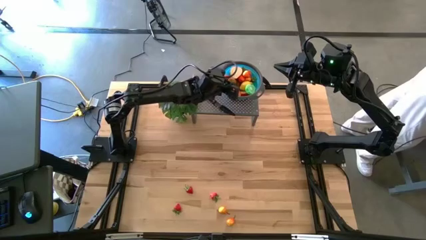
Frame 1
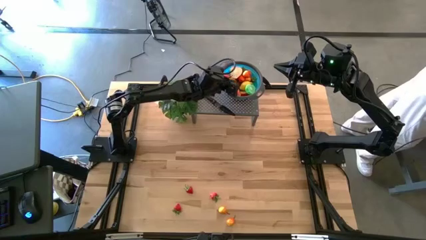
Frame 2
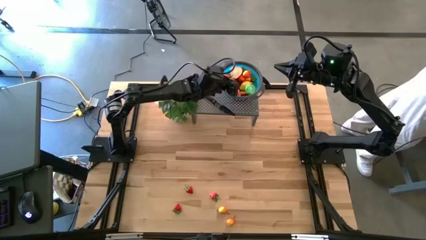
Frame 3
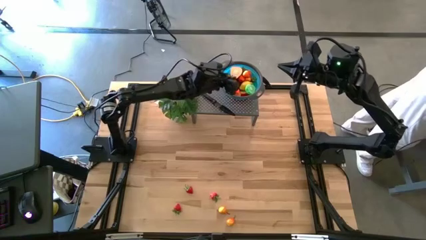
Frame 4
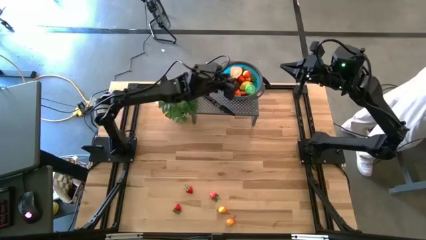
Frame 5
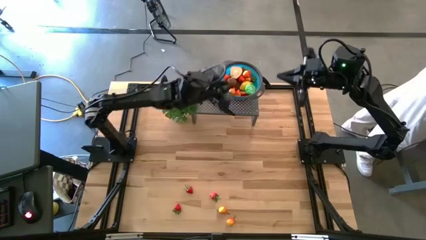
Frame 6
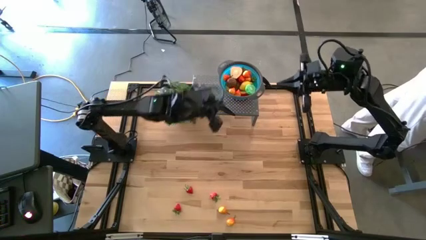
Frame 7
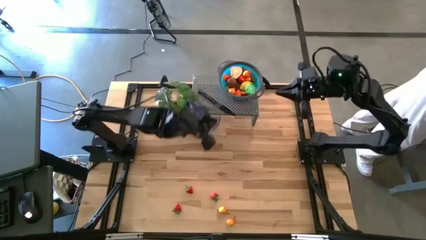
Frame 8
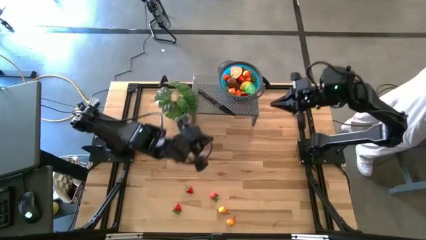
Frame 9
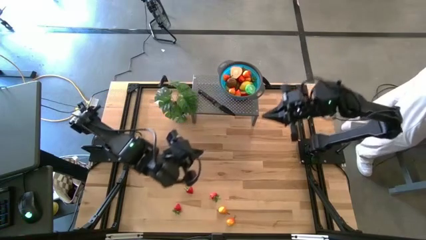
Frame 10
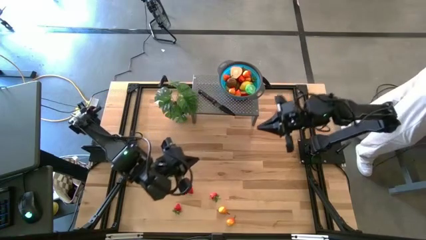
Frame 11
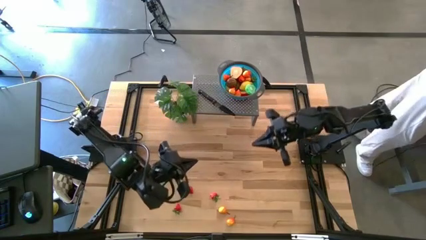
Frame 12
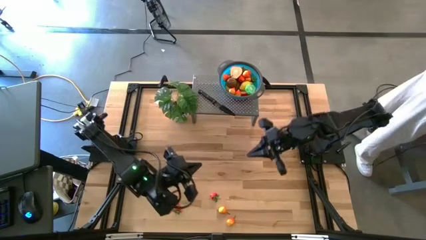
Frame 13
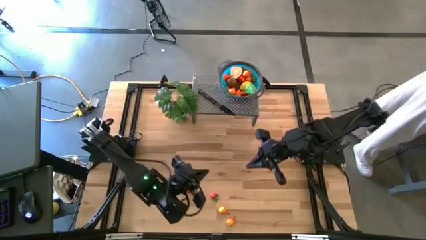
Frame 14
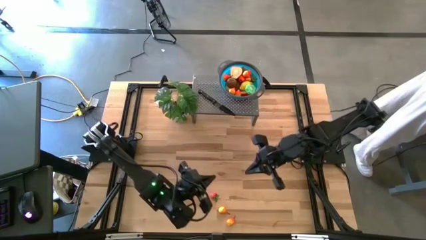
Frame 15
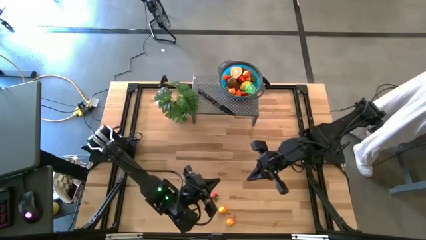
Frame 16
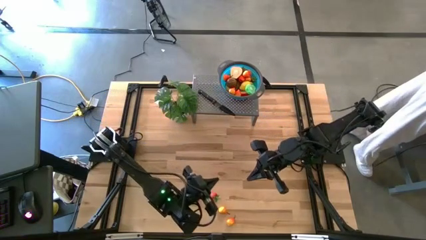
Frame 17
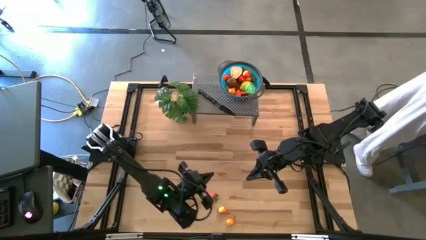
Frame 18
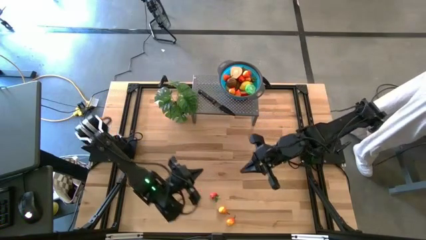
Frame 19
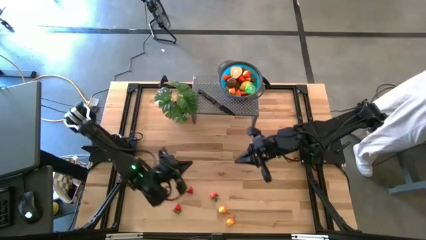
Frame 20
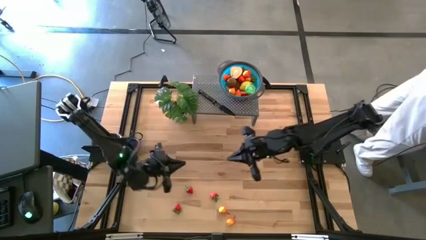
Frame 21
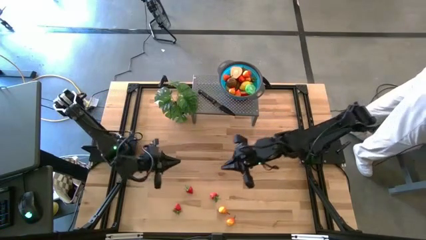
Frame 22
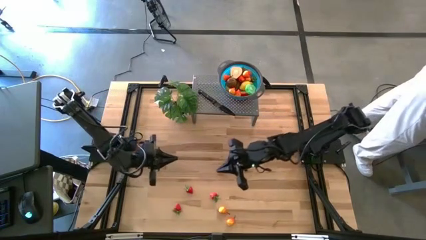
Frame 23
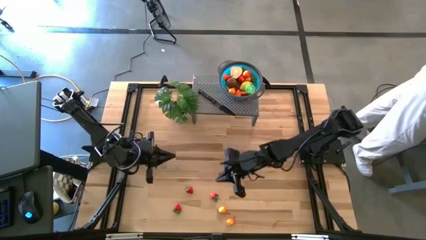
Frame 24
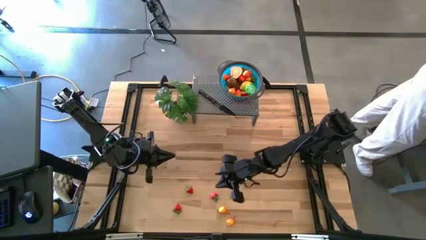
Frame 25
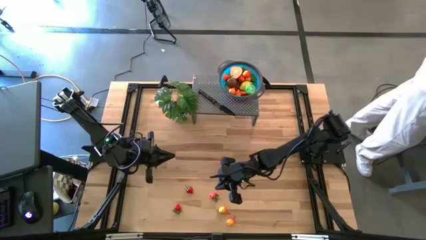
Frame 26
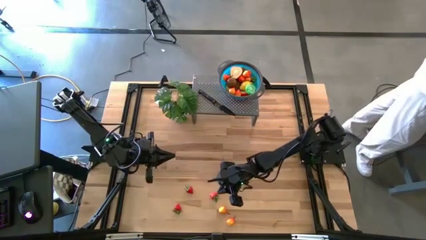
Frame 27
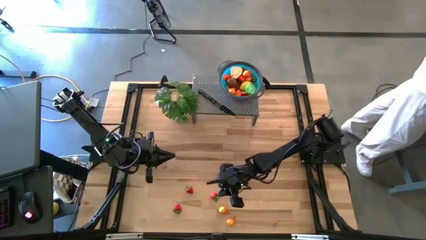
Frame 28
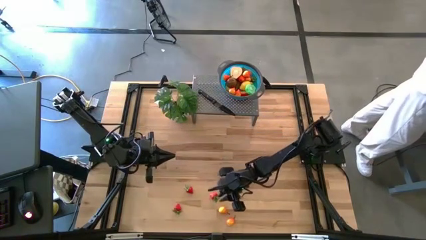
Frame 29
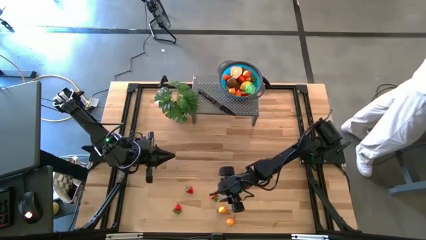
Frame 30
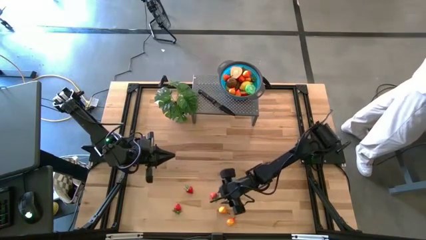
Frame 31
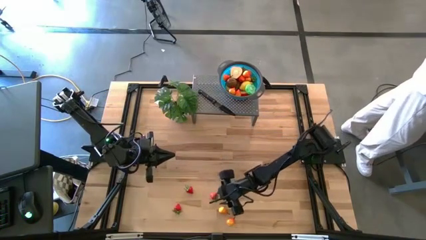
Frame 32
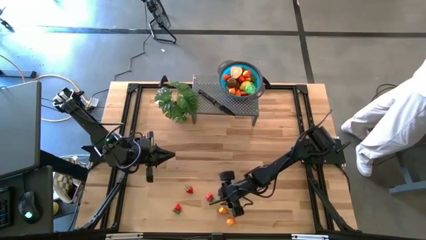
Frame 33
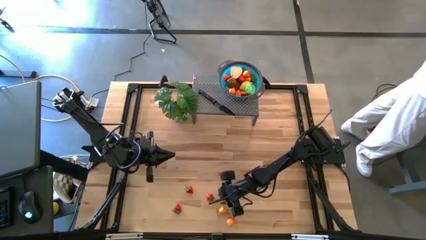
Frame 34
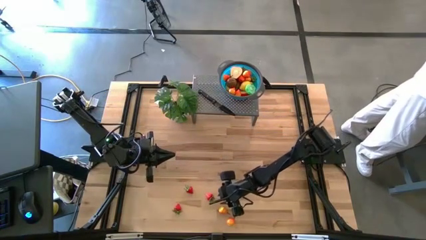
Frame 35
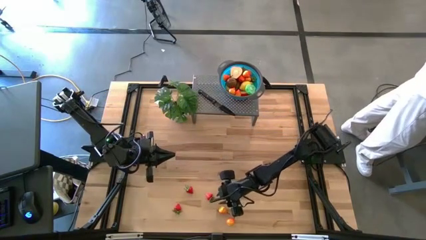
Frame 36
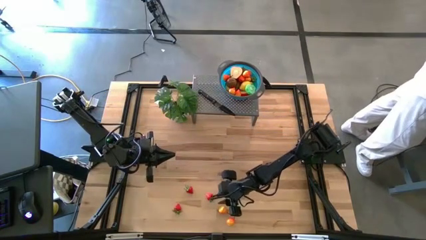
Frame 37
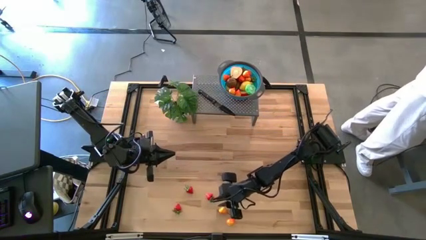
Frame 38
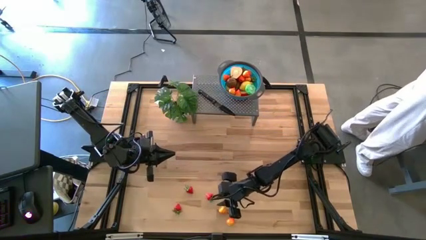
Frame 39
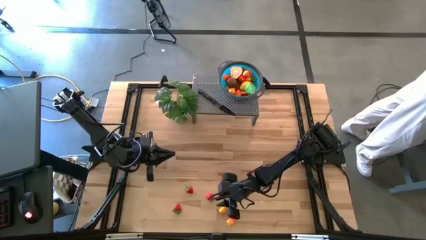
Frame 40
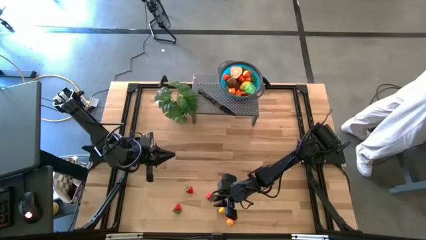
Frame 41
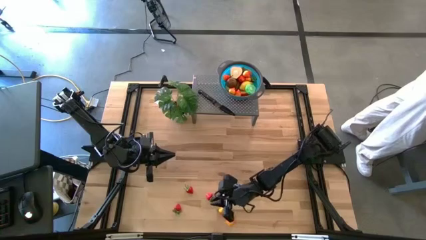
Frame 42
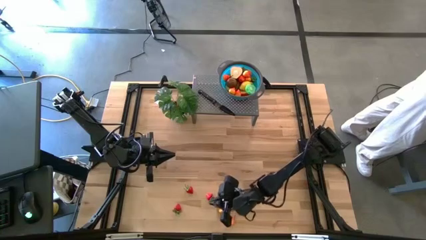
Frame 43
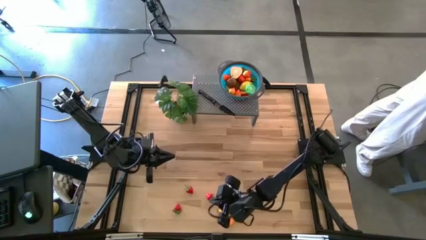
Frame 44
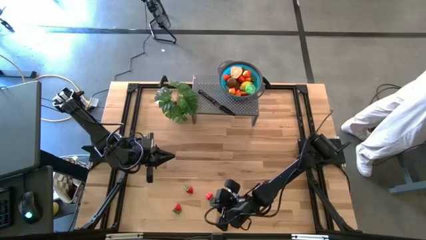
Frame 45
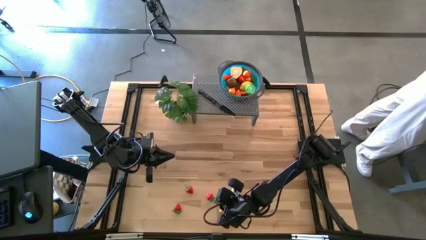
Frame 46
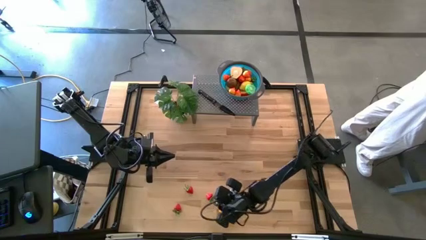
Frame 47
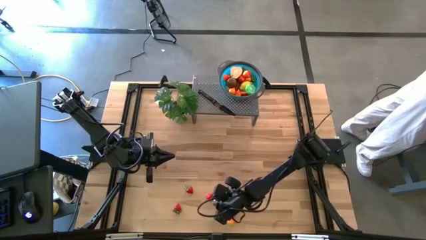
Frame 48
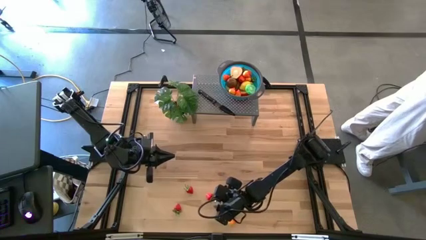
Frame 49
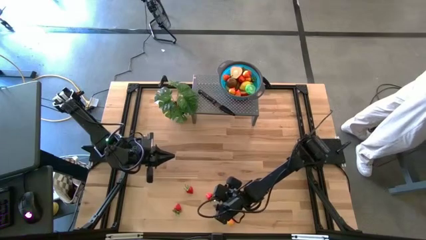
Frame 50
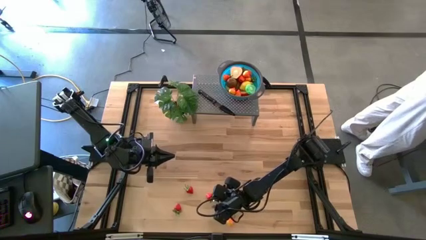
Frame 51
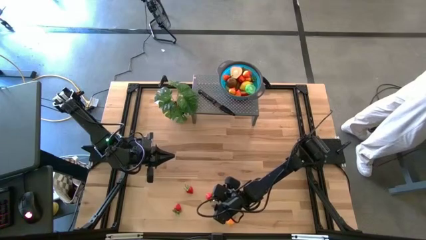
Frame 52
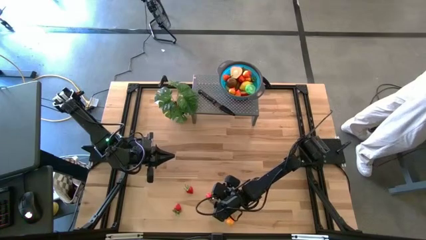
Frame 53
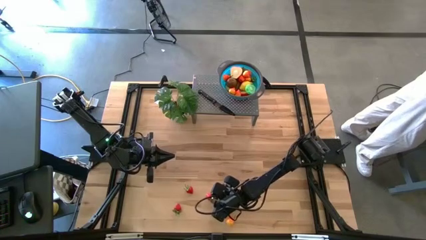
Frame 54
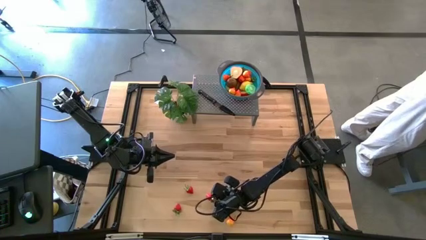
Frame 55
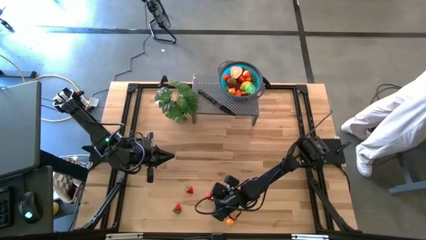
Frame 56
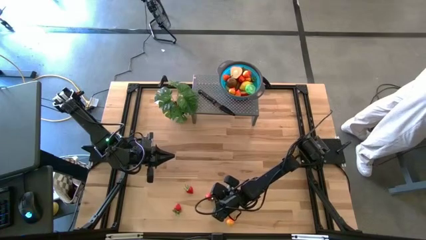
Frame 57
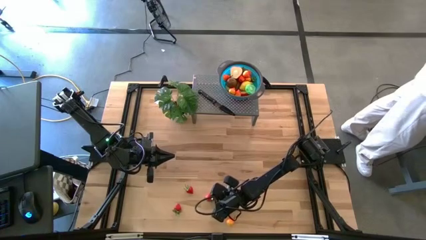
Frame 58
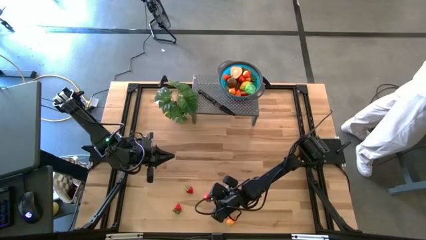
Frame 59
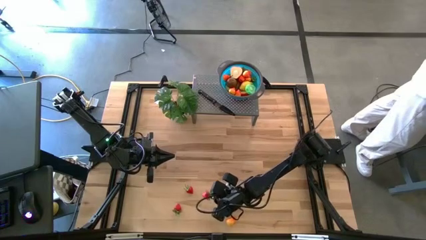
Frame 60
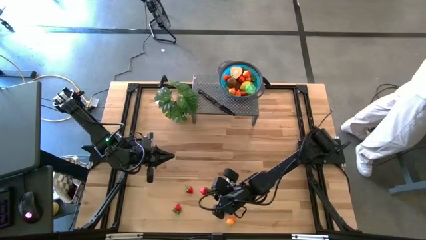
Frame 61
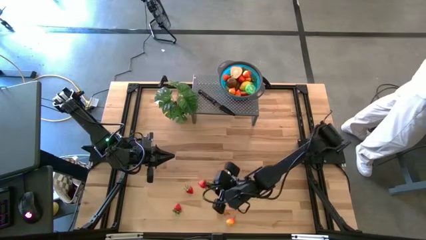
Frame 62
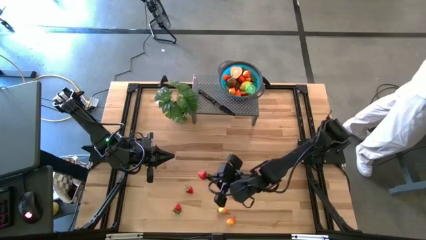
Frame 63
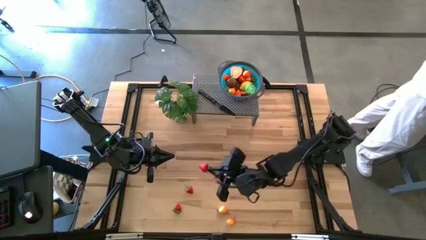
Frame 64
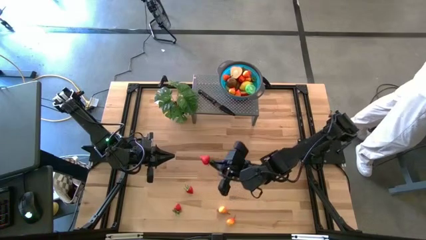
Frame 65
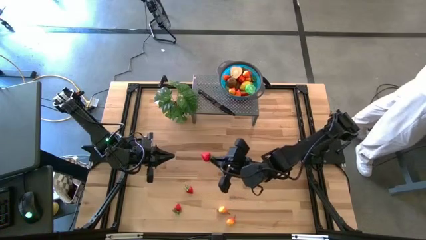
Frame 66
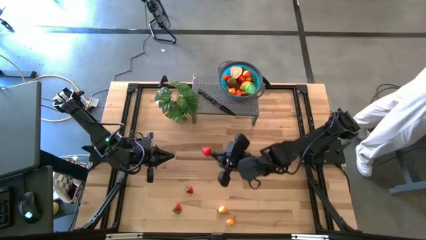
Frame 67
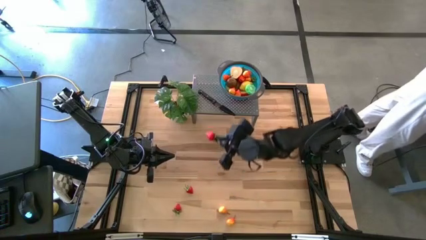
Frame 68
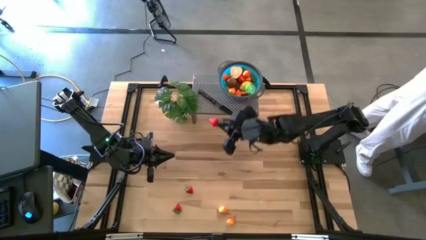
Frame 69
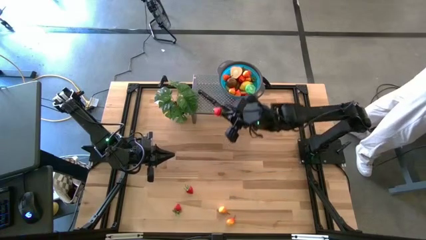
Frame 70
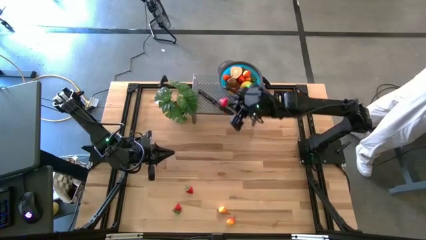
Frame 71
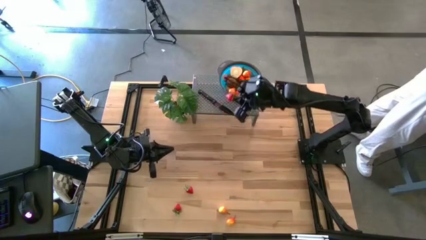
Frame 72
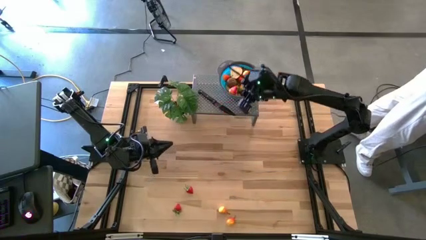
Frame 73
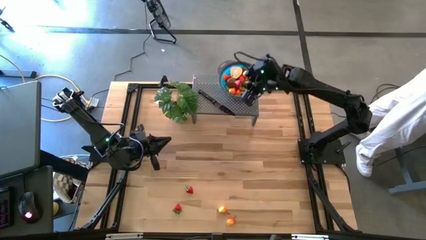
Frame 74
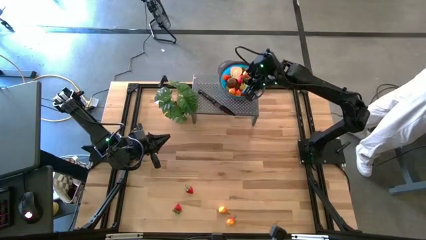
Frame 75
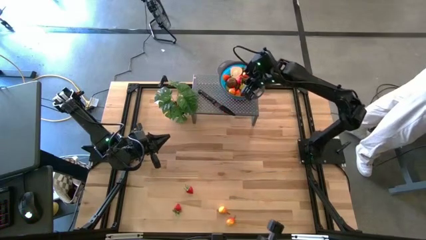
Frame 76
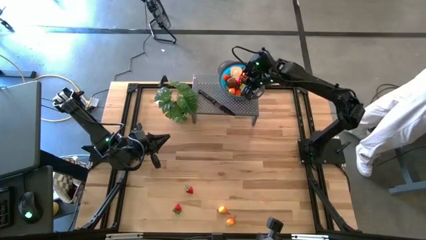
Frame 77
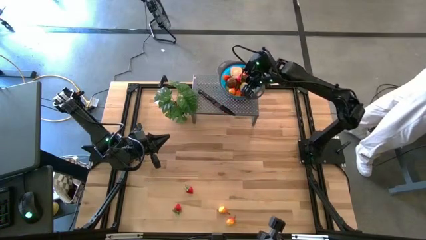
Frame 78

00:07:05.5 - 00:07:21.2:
Task: Pick & Place Fruit
Put the red strawberry in the blue bowl on the shelf

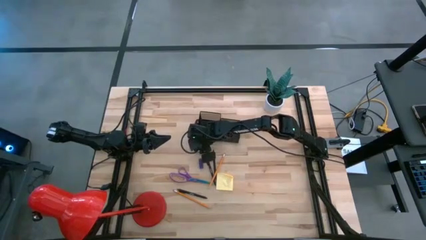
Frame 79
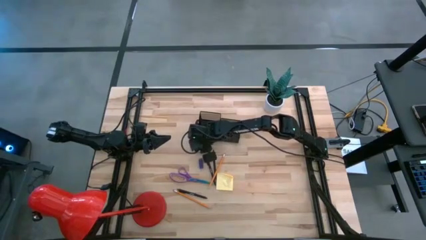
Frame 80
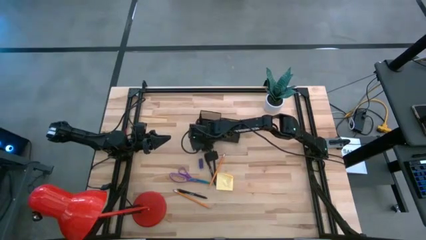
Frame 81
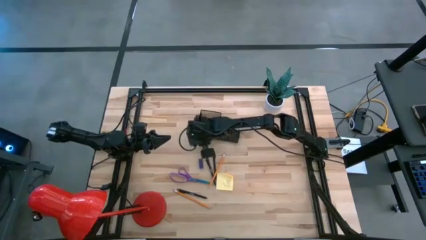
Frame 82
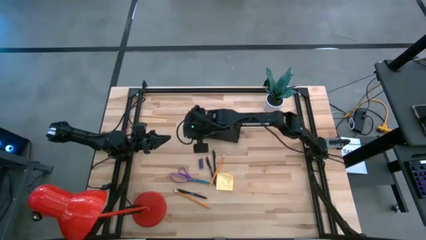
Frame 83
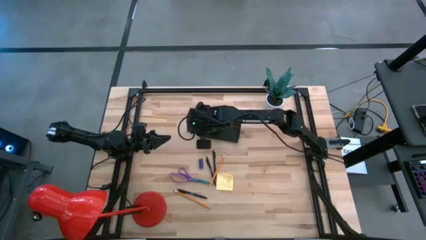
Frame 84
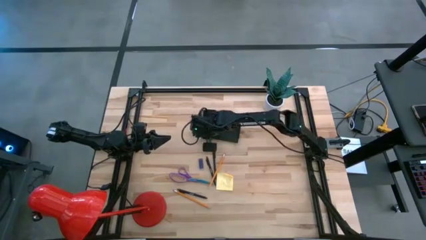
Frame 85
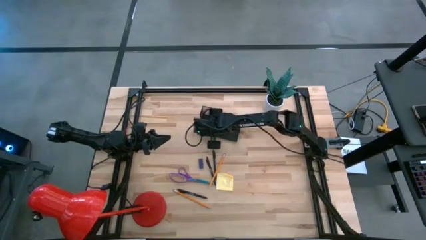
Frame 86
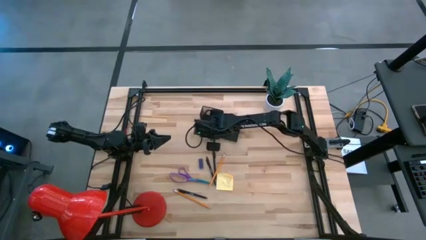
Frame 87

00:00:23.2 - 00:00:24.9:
Task: Pick and place office supplies into organizer
Put the black binder clip into the desk organizer
